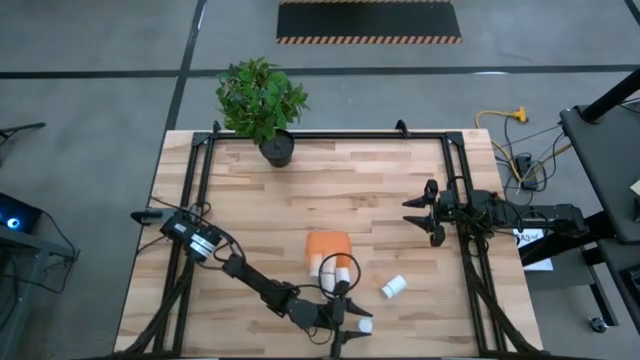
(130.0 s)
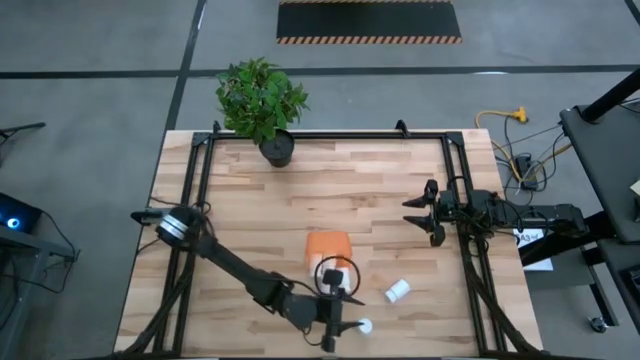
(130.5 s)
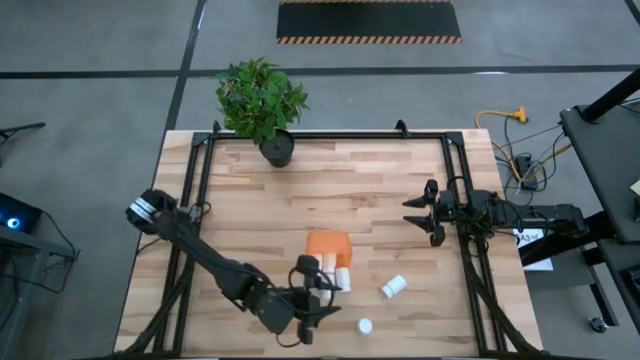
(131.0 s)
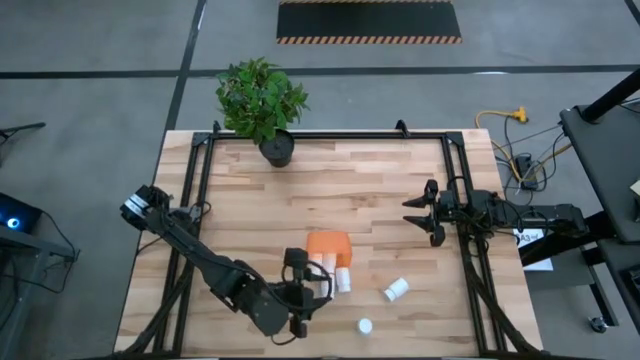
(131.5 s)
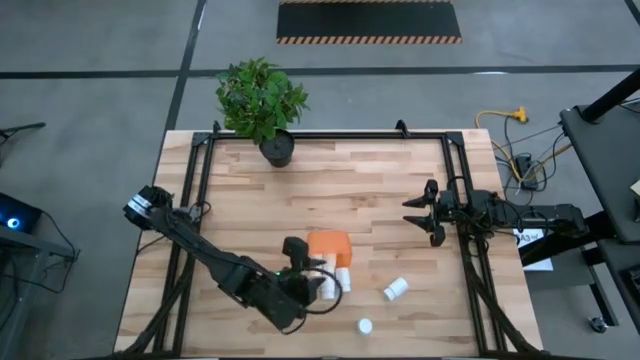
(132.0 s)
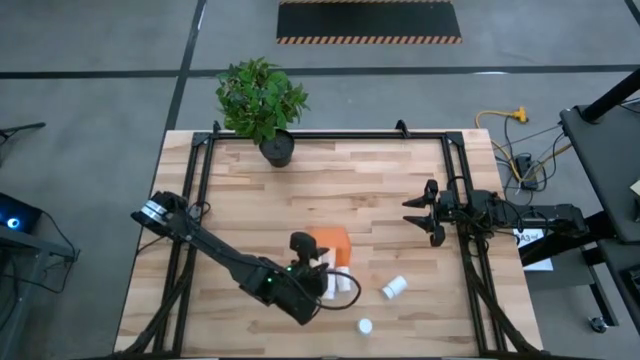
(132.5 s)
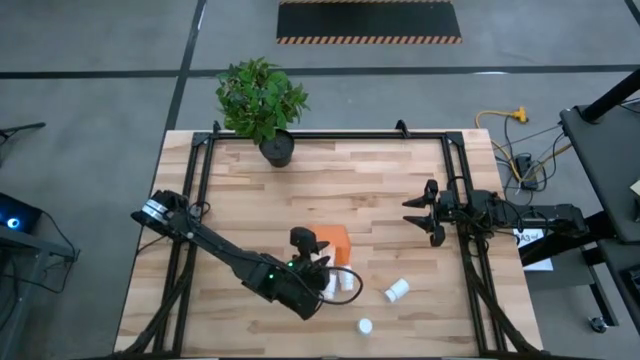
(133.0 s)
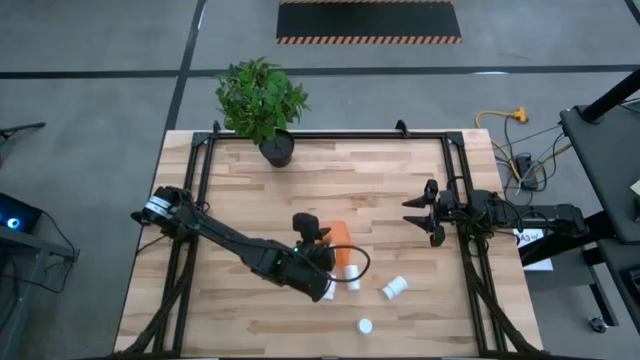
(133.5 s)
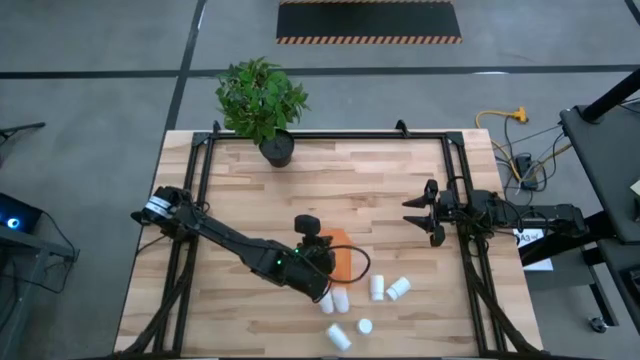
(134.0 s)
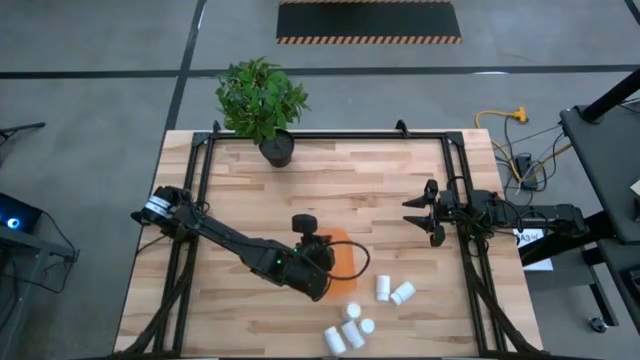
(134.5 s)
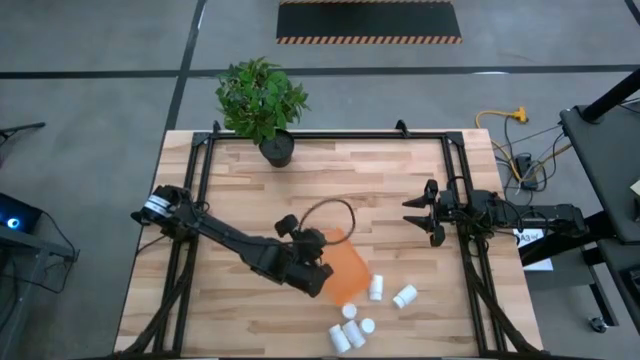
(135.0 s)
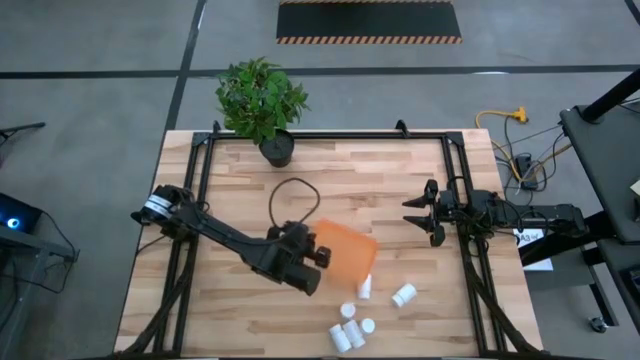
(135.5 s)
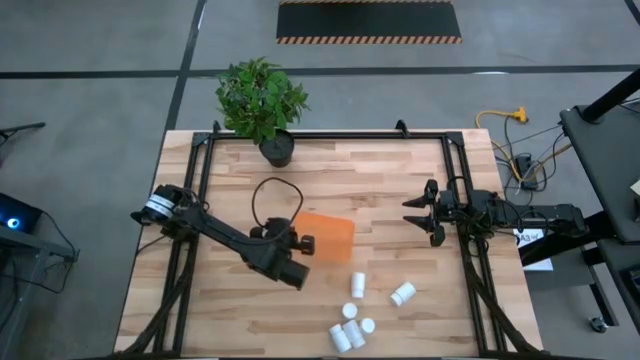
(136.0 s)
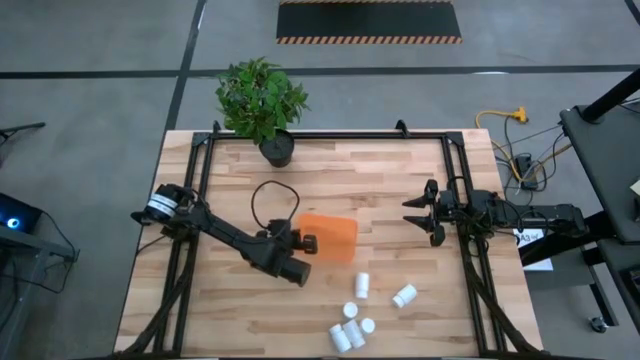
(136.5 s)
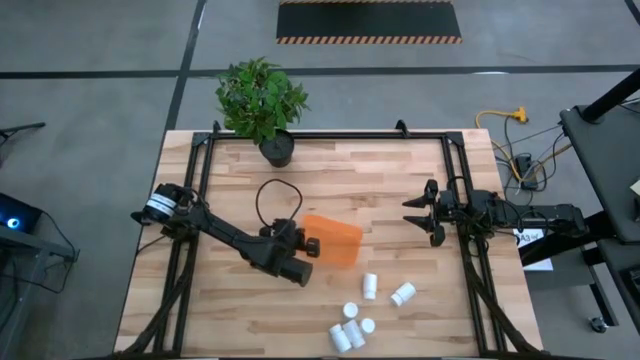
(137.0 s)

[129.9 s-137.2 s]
Task: Pick and place pill bottles into a basket
Adjust the orange container on the table

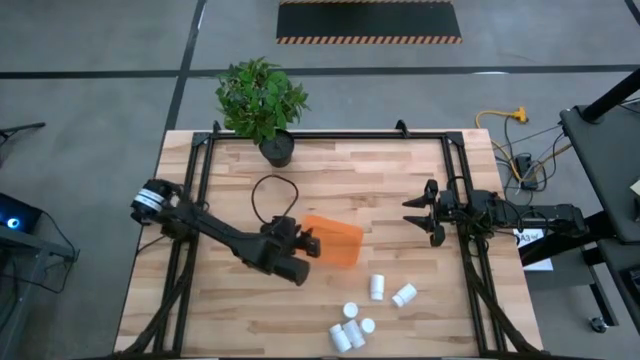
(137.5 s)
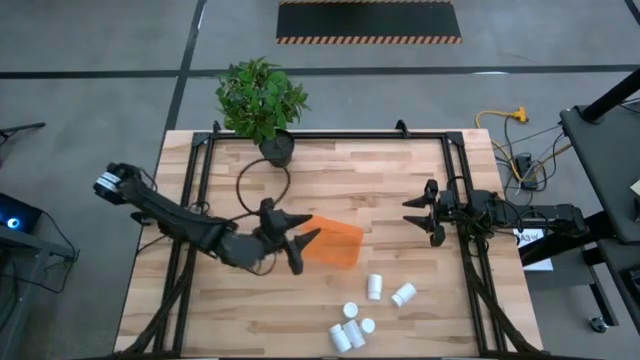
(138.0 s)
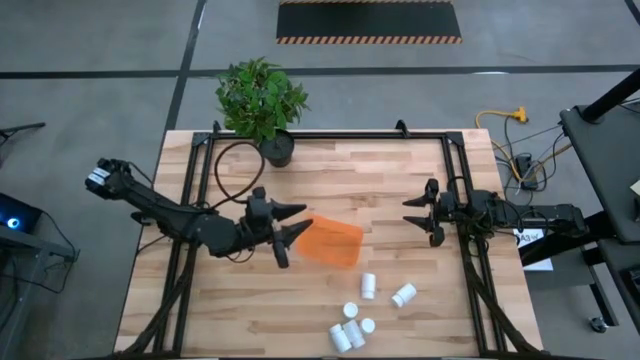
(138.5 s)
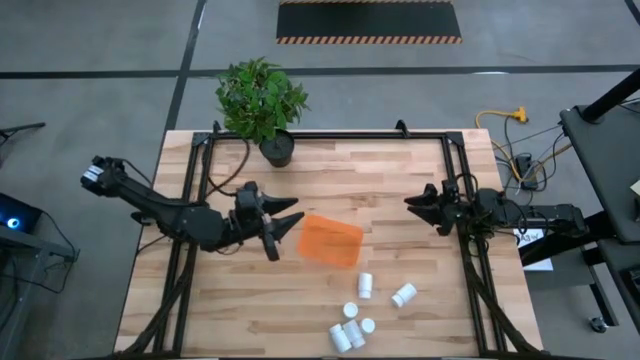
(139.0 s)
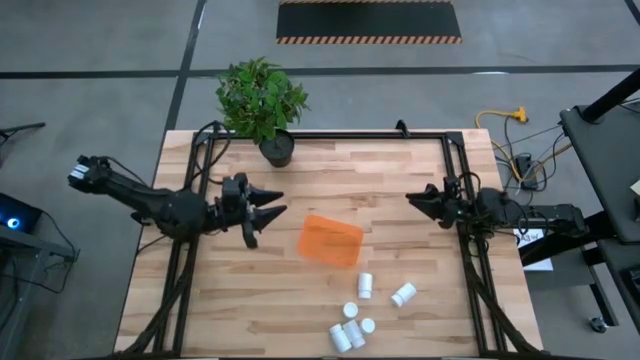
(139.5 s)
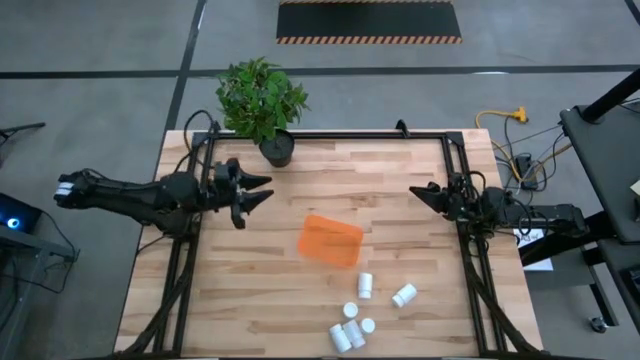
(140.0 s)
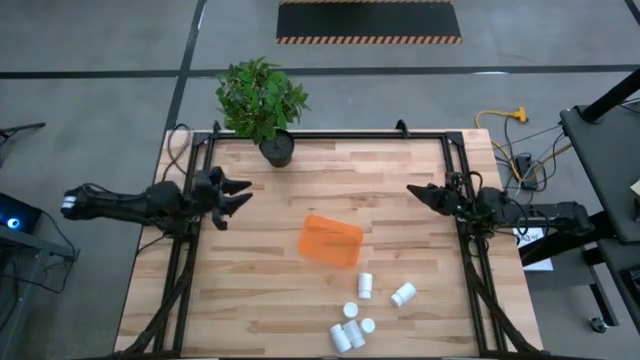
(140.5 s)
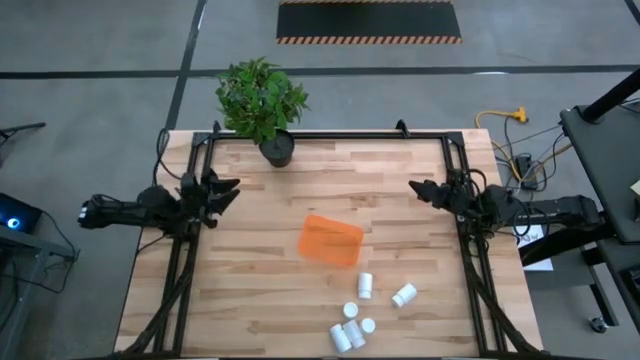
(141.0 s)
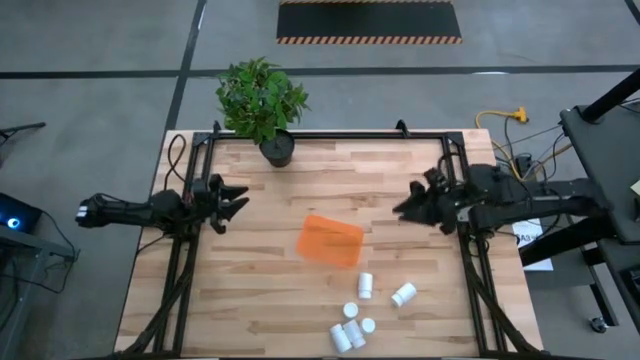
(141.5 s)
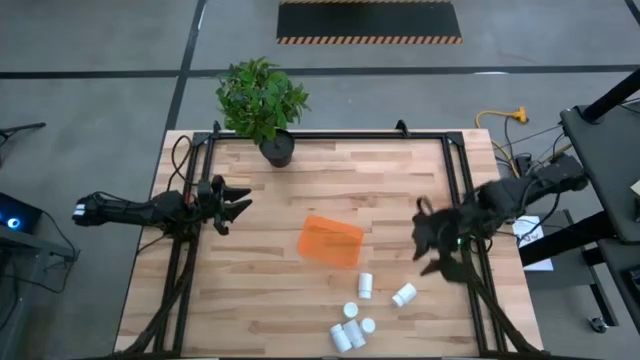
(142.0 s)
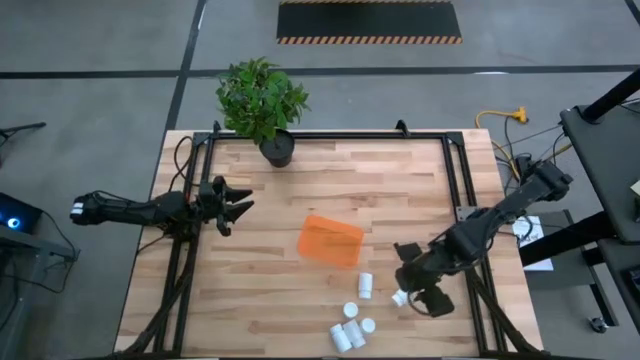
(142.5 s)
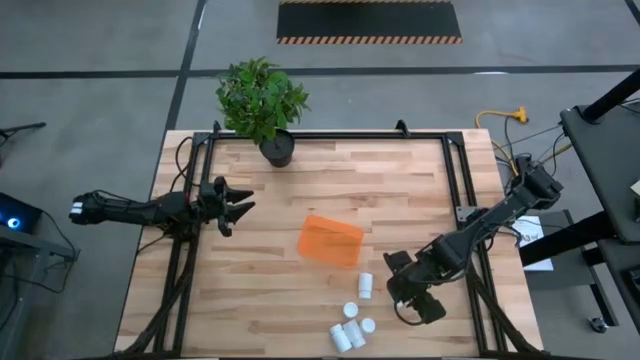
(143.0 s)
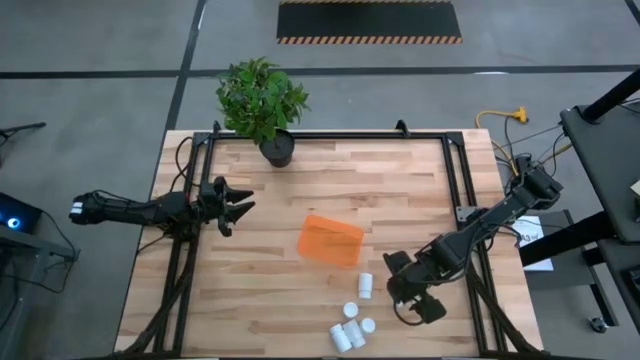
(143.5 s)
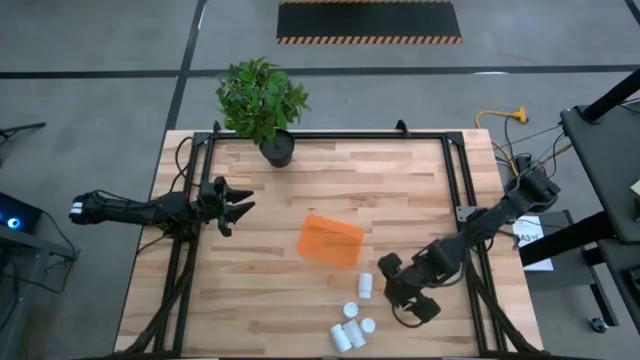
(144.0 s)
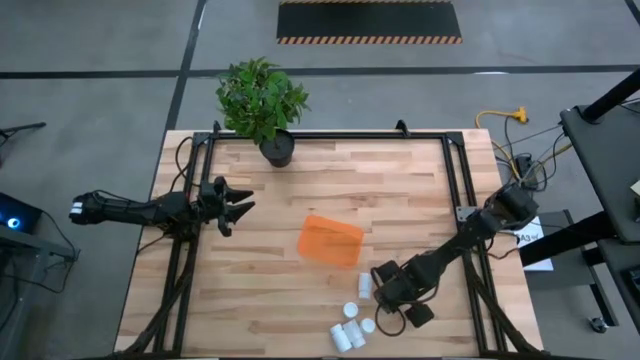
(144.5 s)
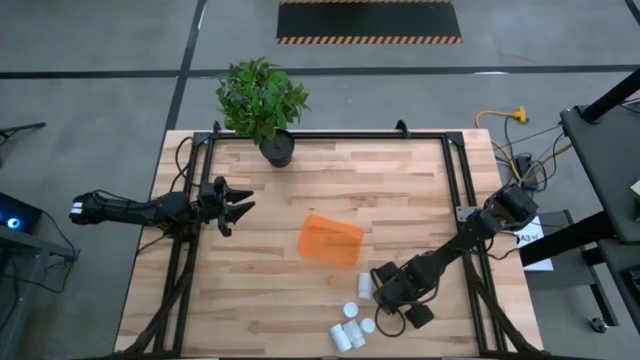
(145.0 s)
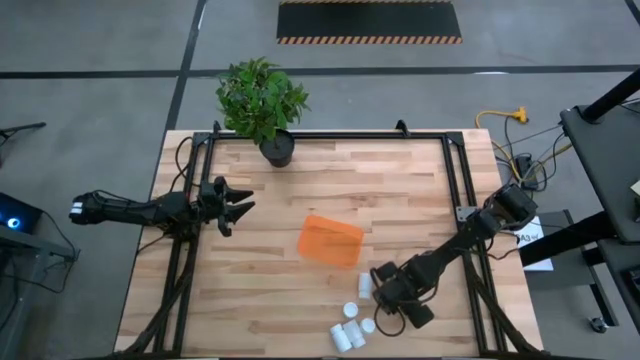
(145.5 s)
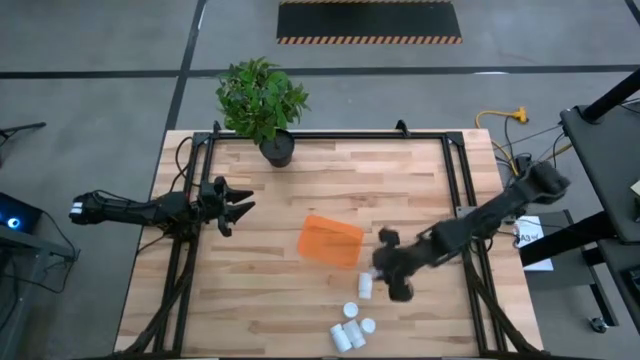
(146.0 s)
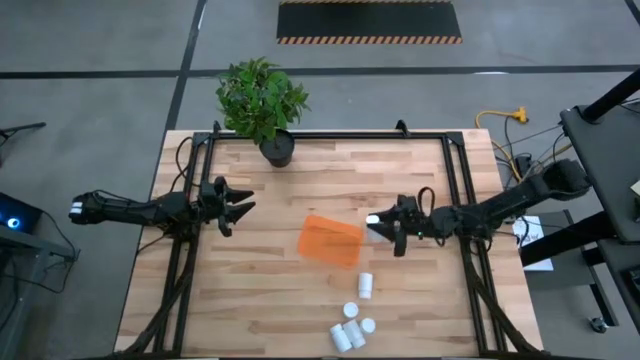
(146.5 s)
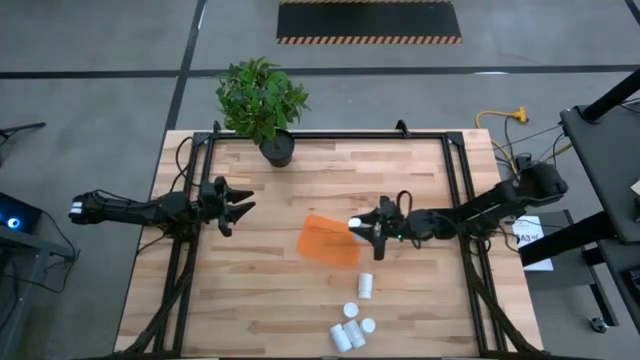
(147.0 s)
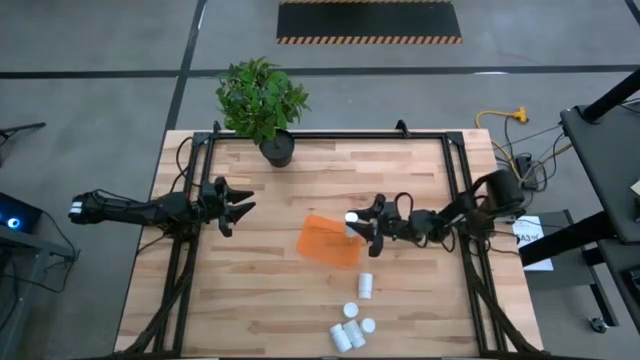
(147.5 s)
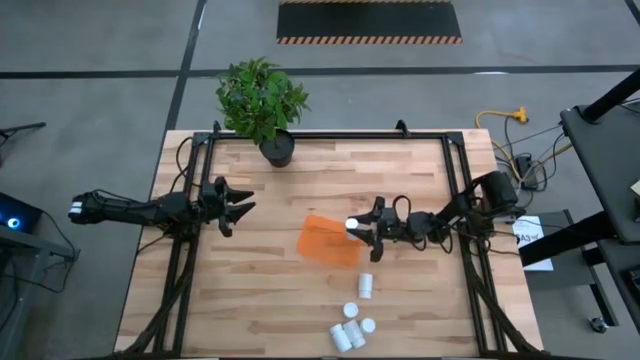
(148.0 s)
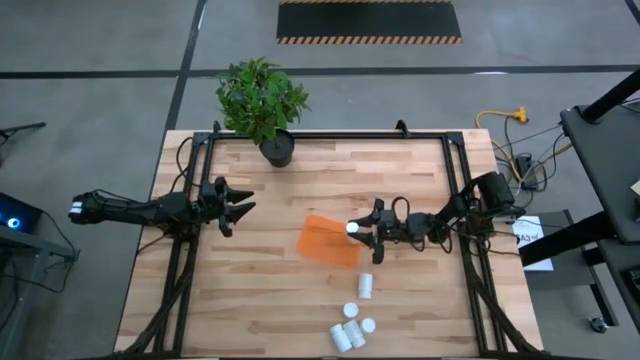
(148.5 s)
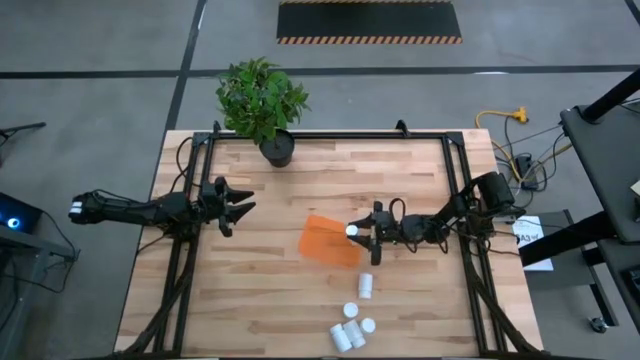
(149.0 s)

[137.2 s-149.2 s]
Put the white pill bottle into the orange container

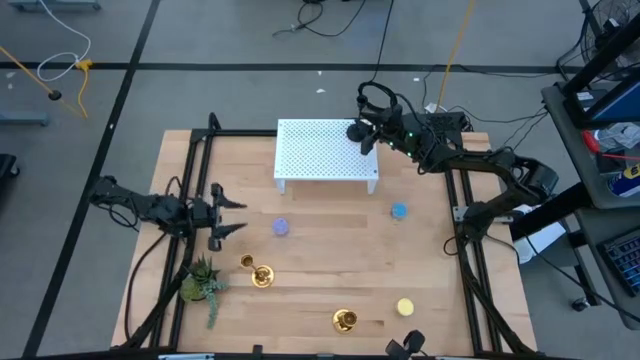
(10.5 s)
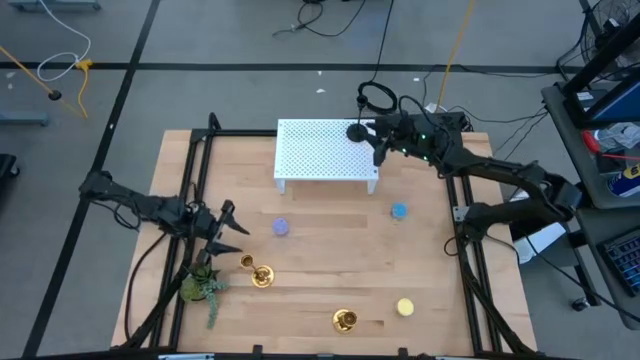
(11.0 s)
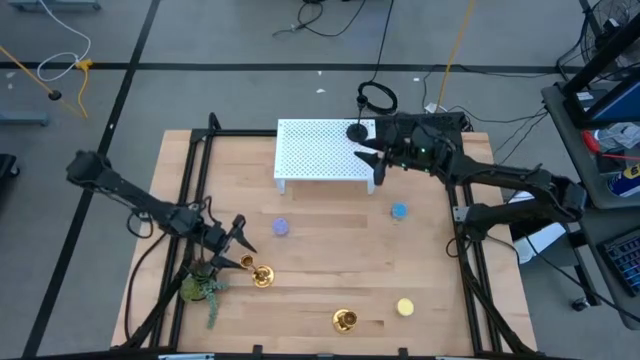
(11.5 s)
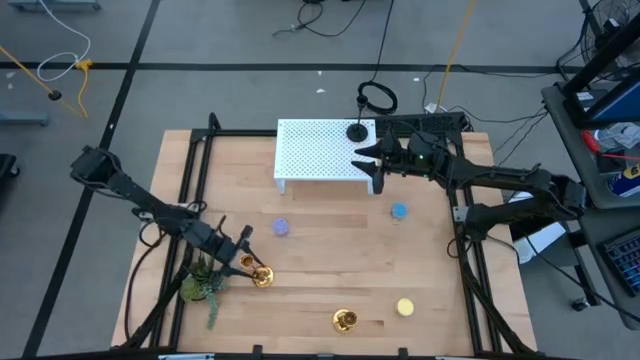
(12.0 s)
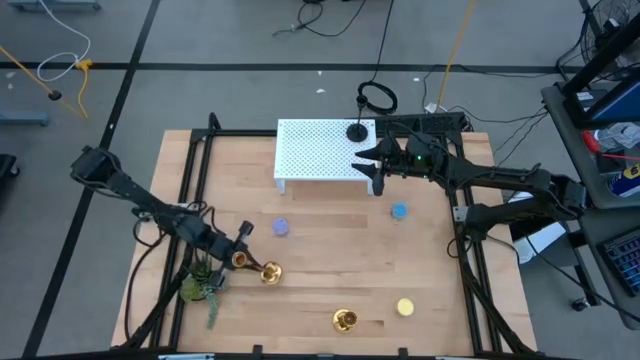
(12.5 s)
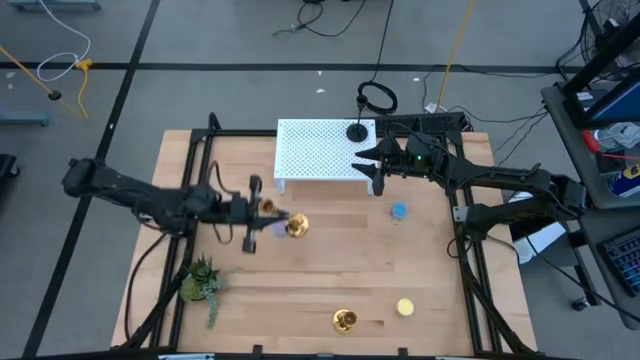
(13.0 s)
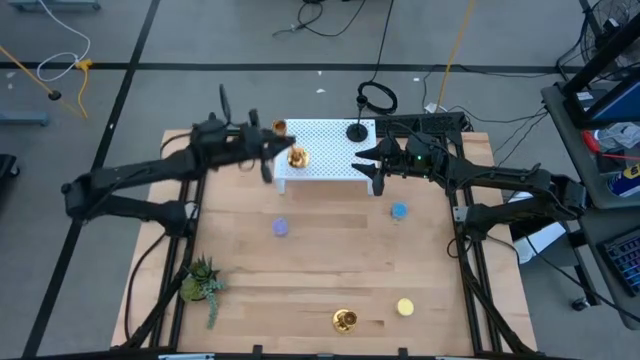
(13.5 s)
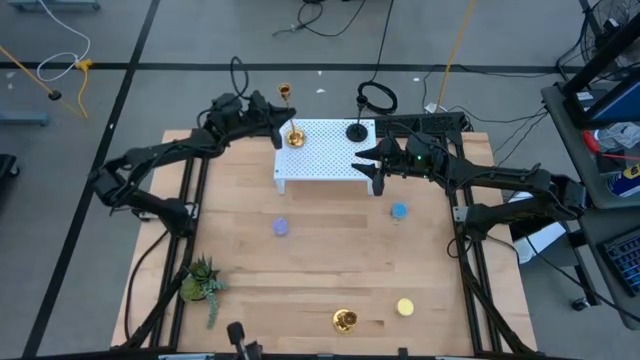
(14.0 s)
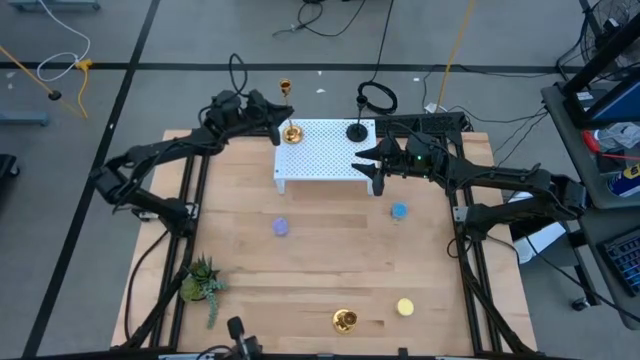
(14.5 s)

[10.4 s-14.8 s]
Task: Pick & Place candle stick holders
Put the left gold candle holder on the shelf
